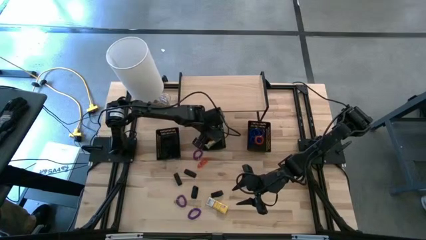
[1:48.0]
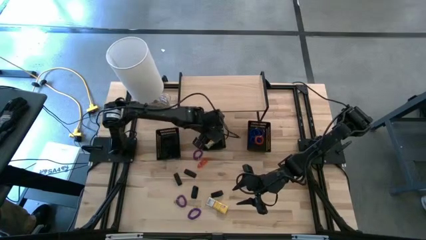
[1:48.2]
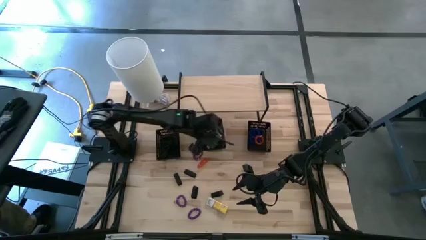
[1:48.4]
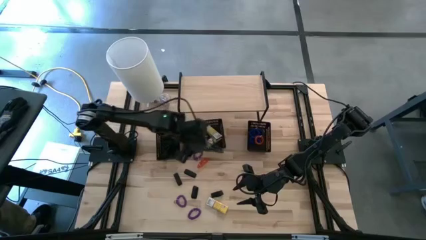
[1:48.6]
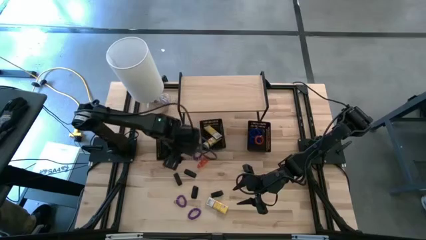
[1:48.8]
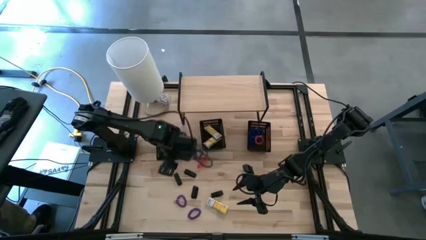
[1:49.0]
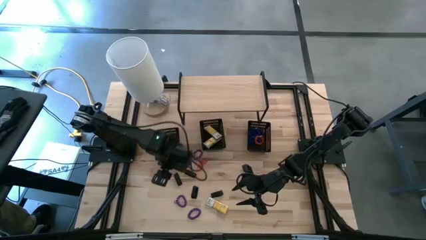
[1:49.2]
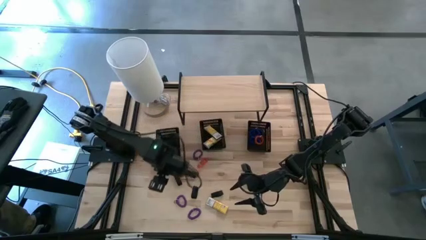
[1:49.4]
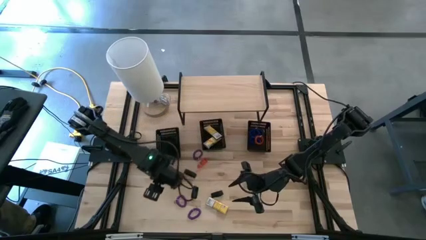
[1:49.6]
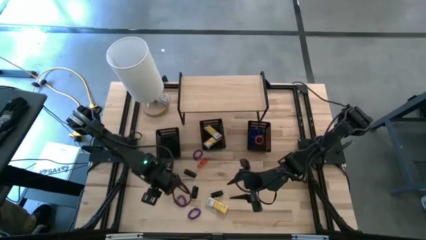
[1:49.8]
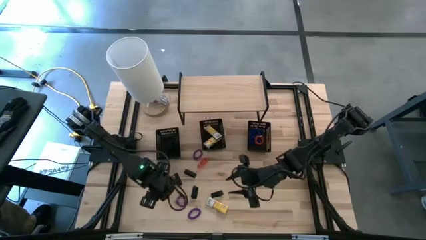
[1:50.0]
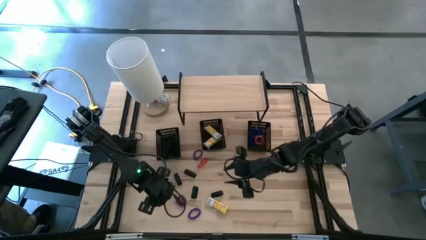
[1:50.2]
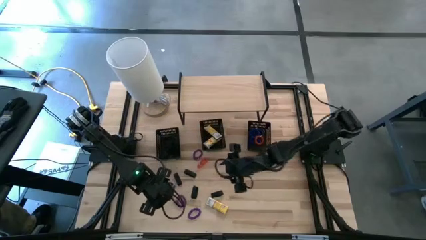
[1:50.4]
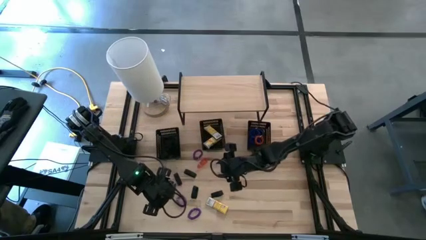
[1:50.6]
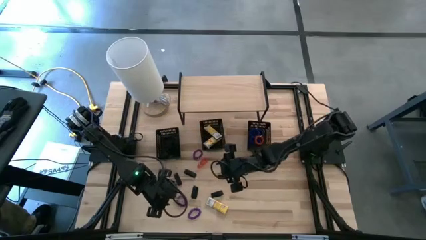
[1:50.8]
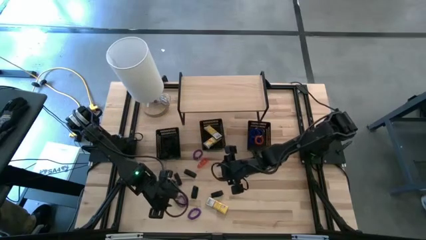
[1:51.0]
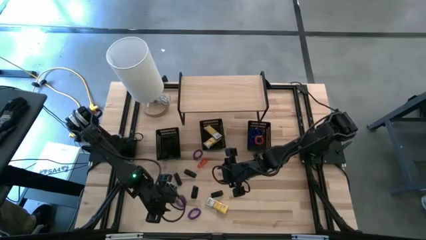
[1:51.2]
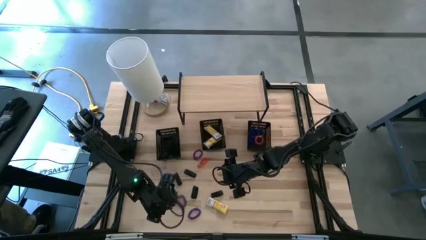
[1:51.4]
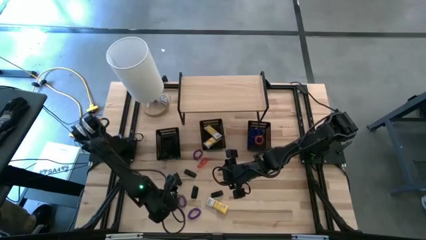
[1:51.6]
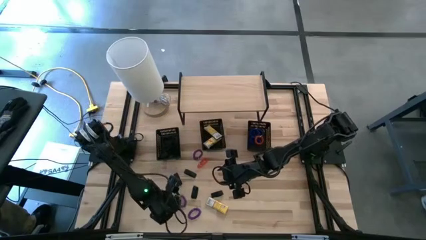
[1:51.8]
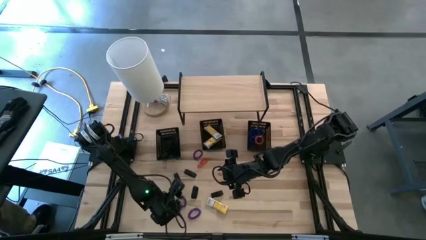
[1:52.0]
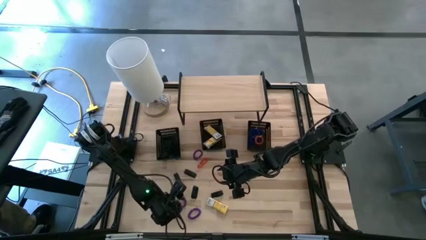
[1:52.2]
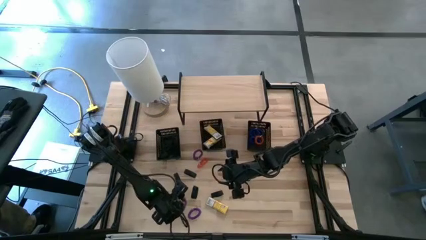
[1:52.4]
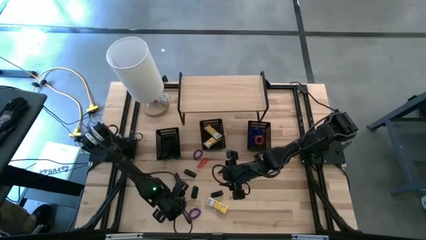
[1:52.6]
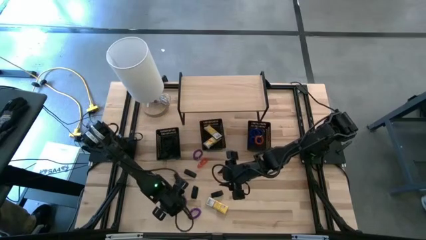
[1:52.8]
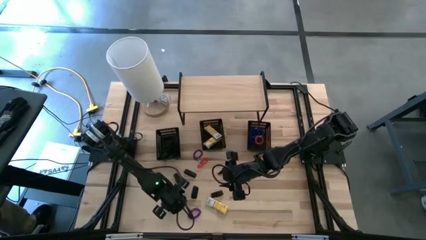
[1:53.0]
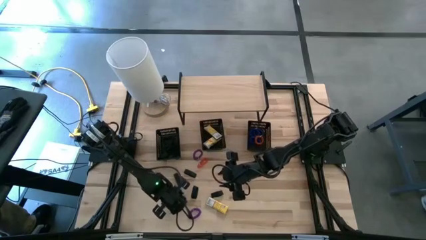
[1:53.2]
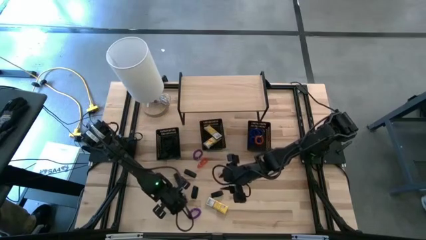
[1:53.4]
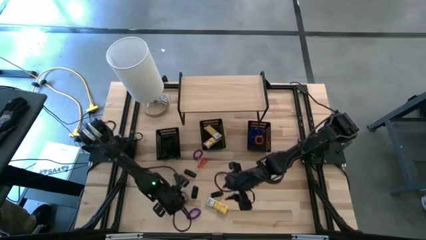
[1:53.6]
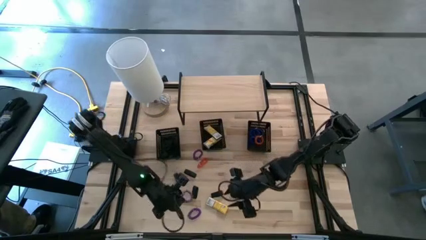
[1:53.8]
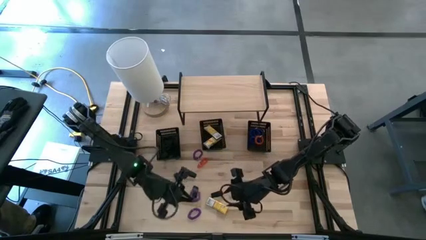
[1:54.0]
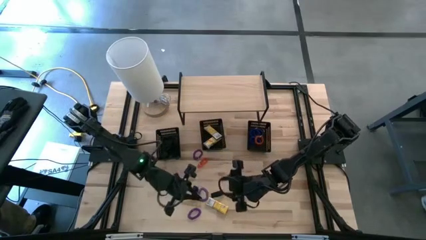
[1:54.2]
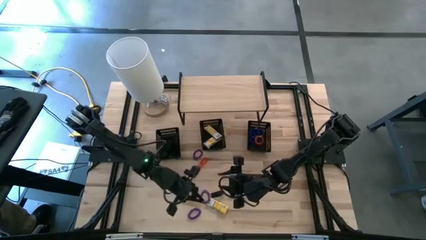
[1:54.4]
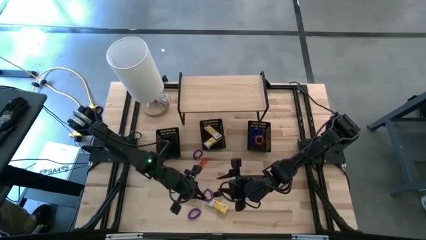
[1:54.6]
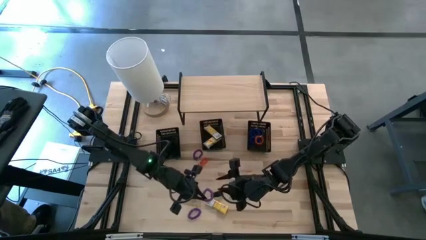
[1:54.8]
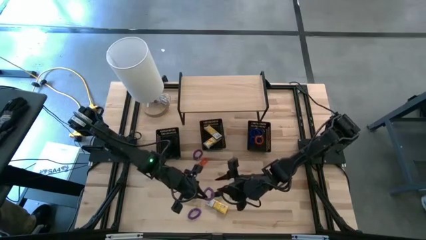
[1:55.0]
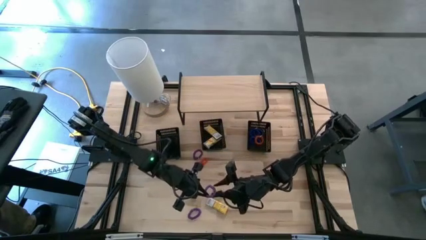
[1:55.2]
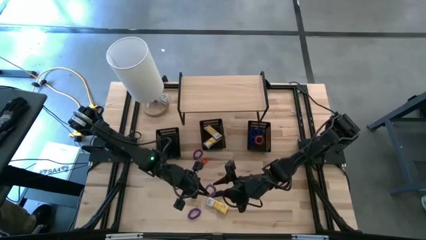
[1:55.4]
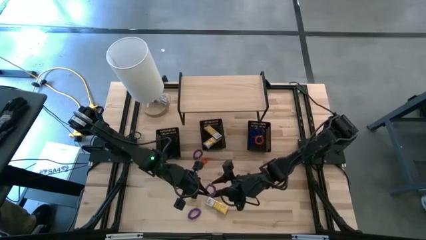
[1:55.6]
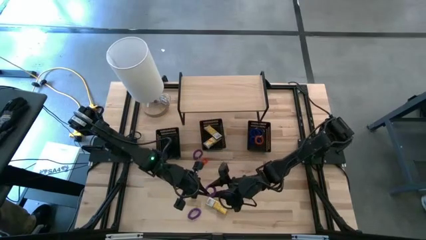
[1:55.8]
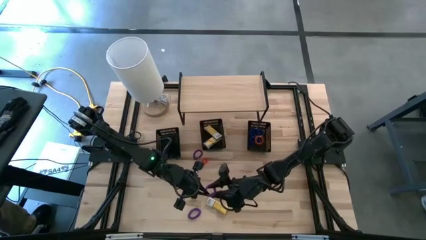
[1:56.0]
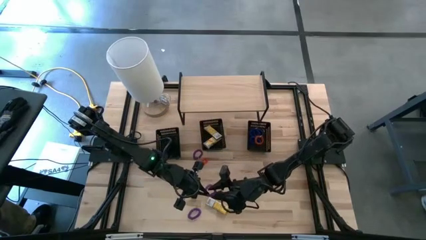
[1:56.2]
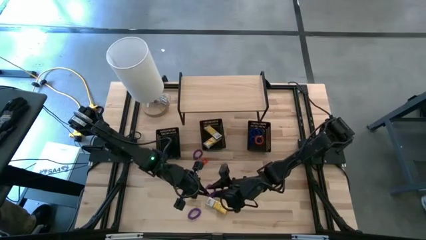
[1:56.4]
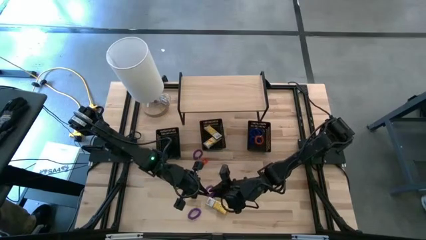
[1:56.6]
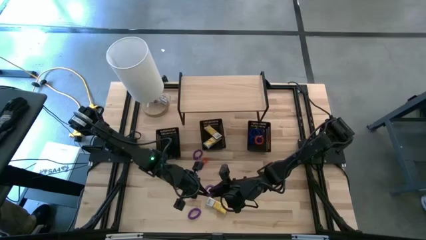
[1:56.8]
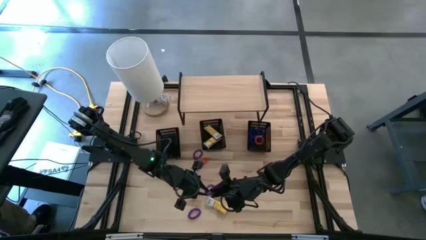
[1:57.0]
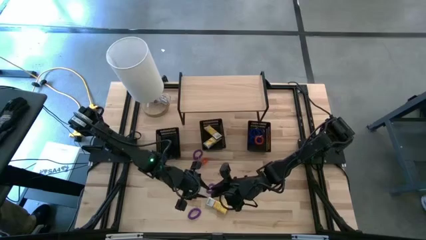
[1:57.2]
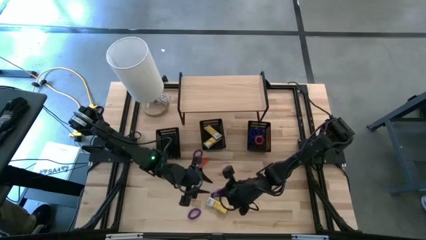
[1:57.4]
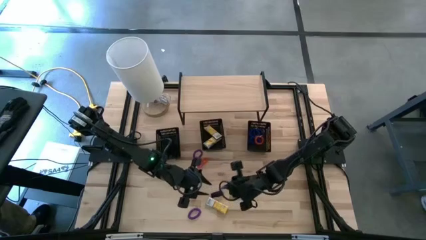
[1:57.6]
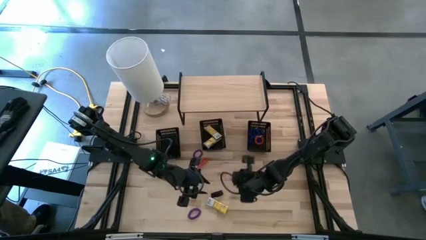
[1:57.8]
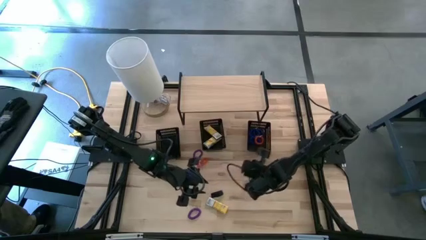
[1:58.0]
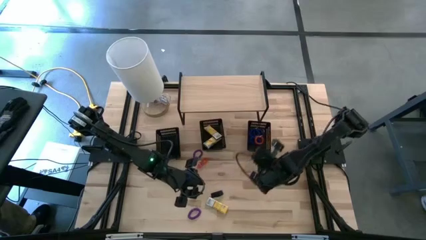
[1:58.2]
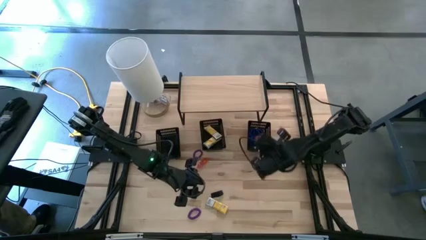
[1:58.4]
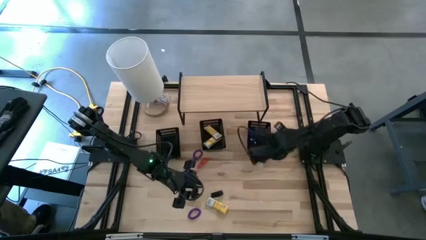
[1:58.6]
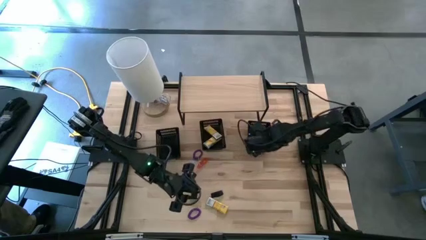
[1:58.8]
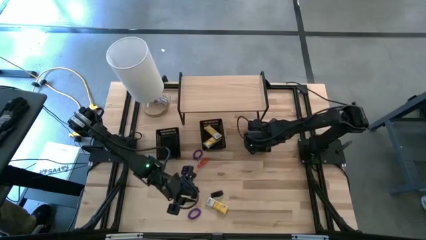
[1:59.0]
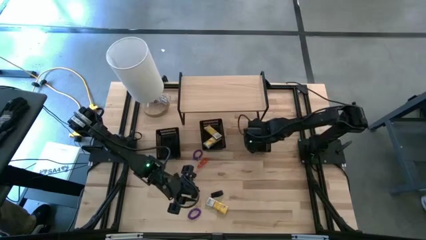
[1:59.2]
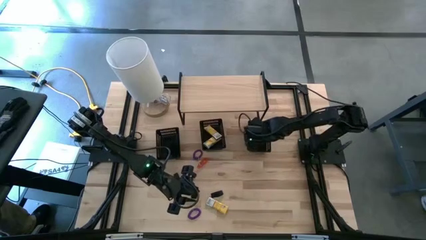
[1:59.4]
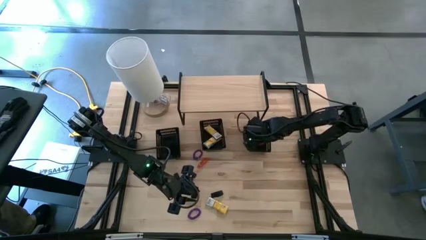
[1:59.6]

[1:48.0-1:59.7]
Task: Pick & Place Office Desk Supplies
Put the purple spring keychain into the right black bin

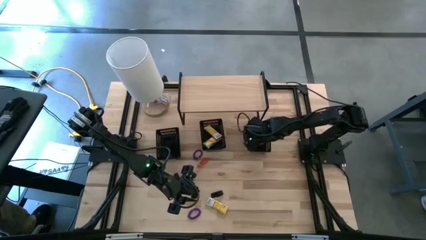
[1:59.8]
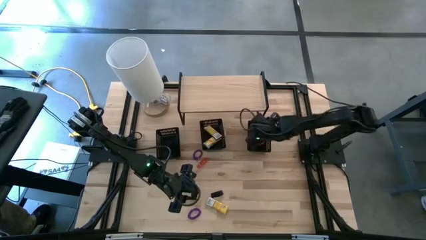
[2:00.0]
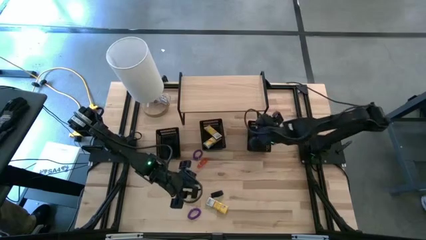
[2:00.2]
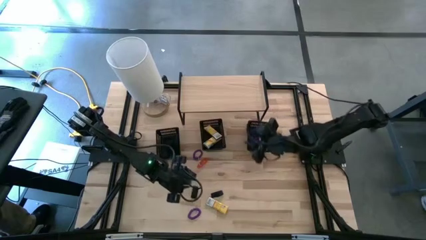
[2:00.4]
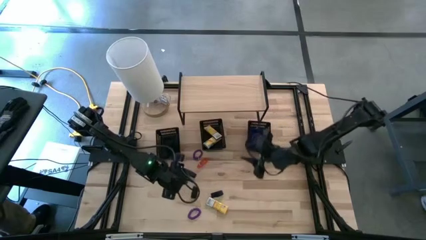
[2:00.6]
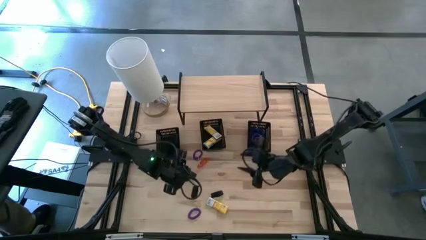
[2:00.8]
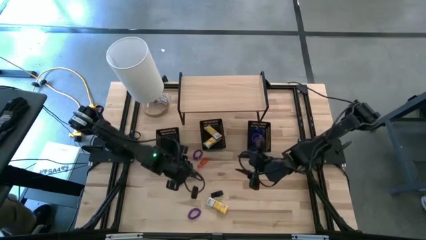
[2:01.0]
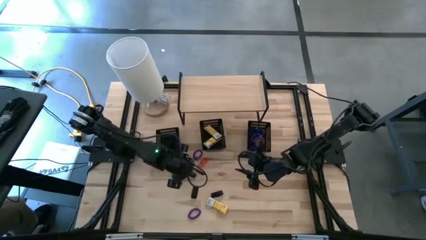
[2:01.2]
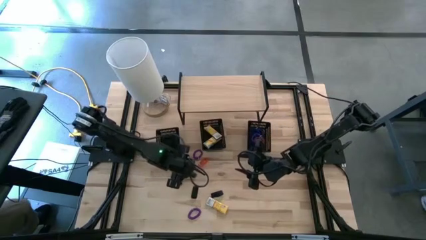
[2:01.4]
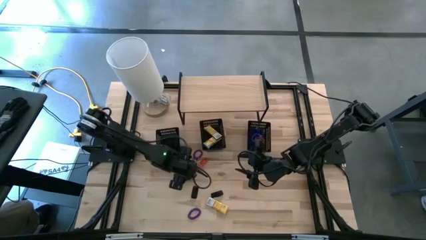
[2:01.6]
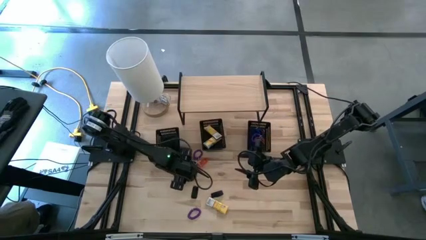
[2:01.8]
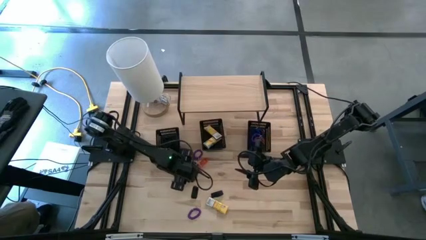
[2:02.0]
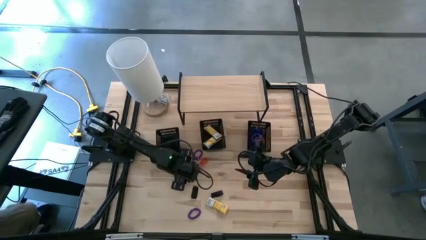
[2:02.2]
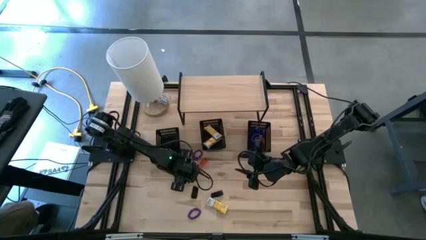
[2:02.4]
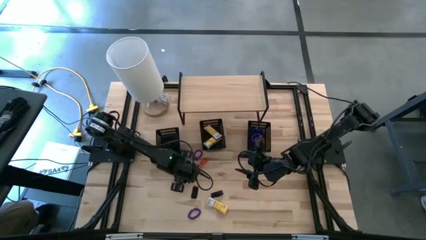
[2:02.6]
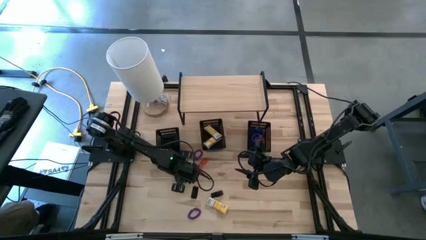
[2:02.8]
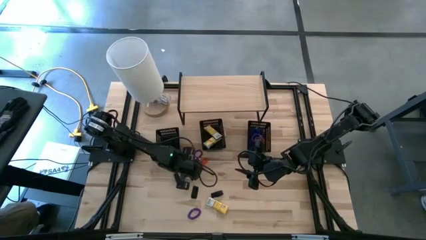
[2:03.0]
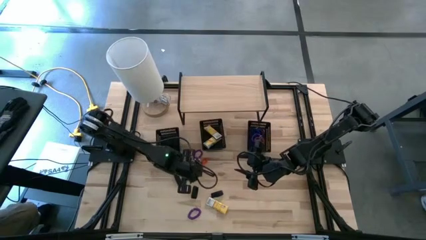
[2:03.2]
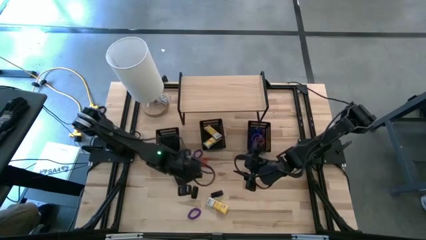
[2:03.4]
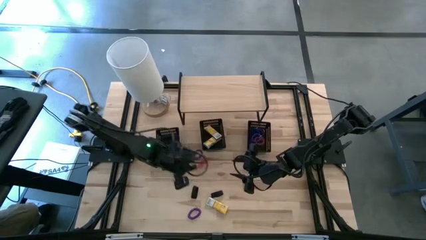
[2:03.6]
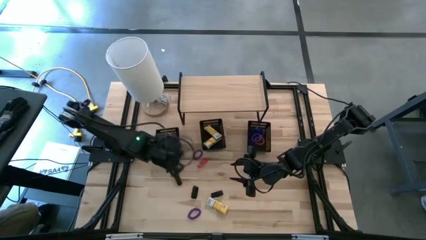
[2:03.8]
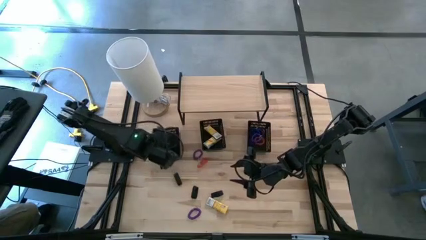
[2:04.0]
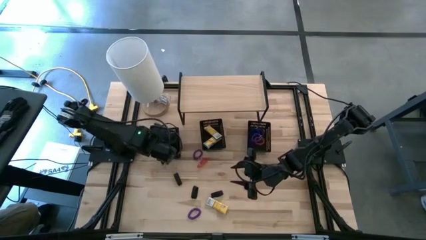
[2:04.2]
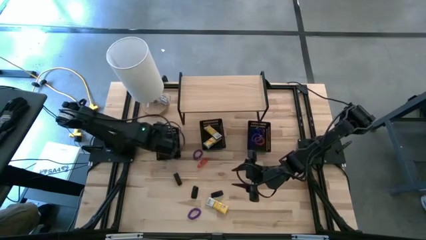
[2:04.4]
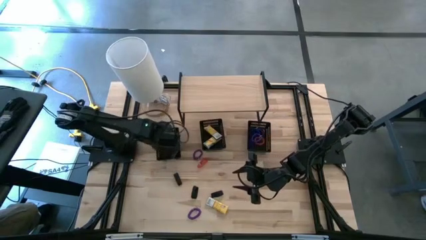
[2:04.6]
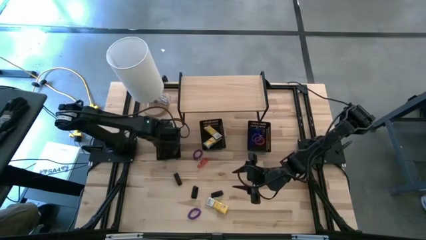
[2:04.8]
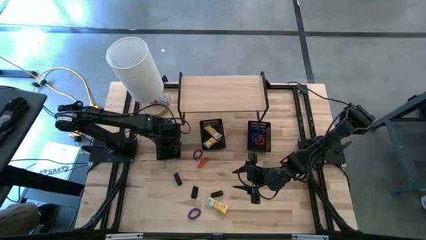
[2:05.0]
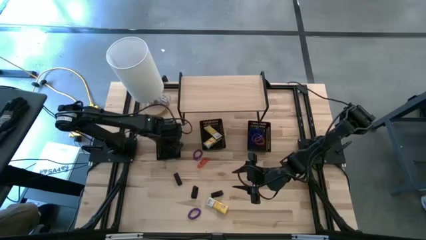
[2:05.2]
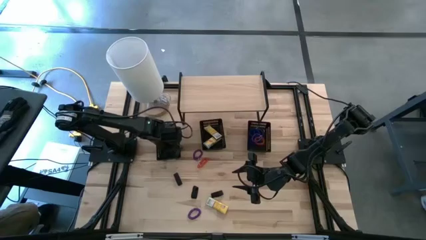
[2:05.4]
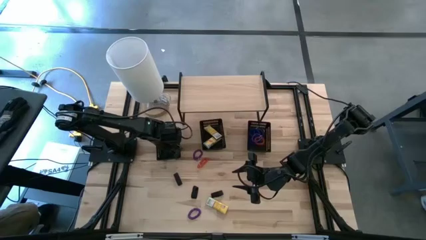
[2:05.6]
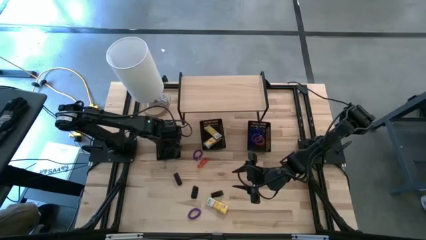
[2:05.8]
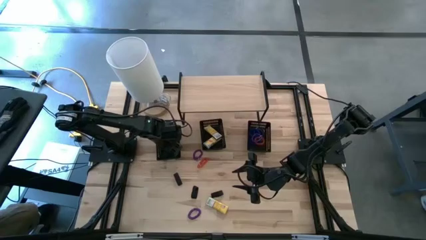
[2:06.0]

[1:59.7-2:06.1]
Put the black rubber band into the left black bin
